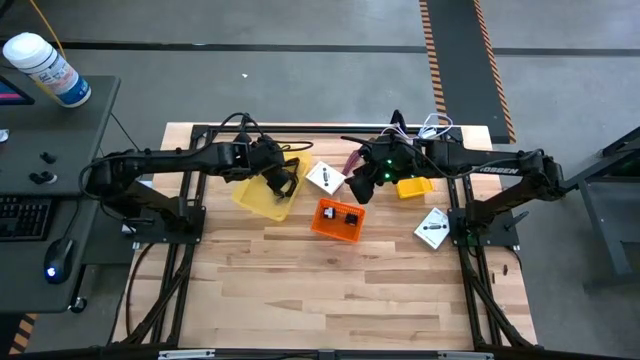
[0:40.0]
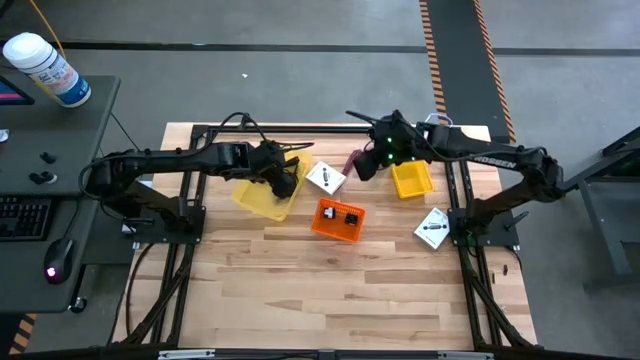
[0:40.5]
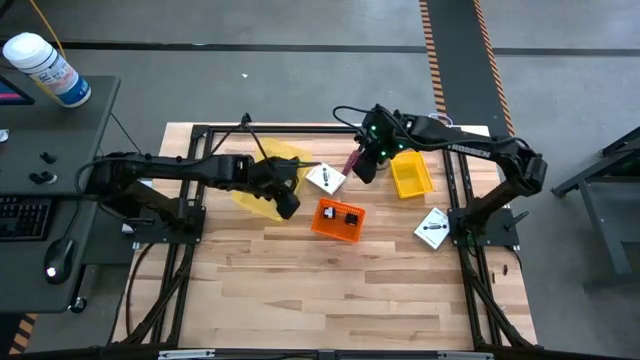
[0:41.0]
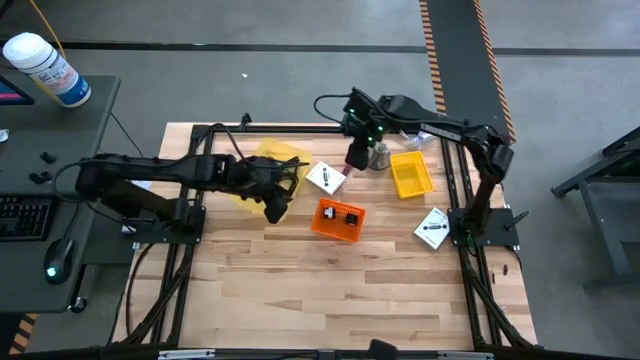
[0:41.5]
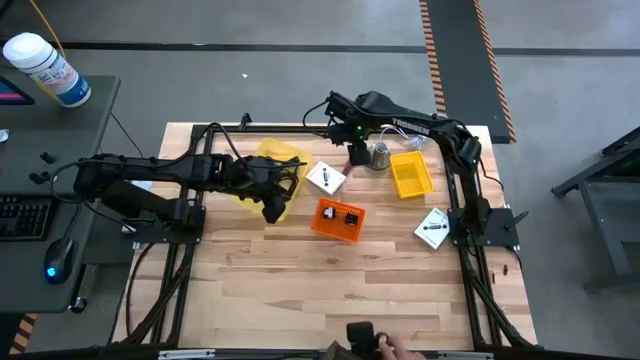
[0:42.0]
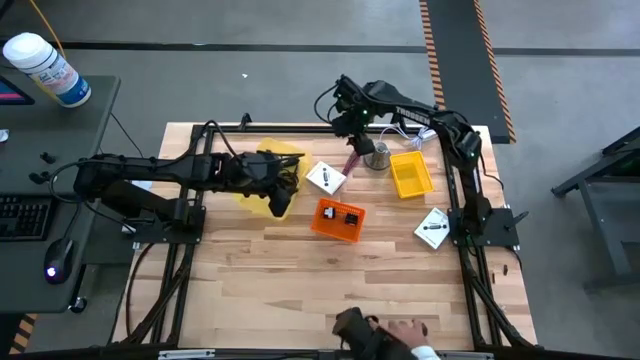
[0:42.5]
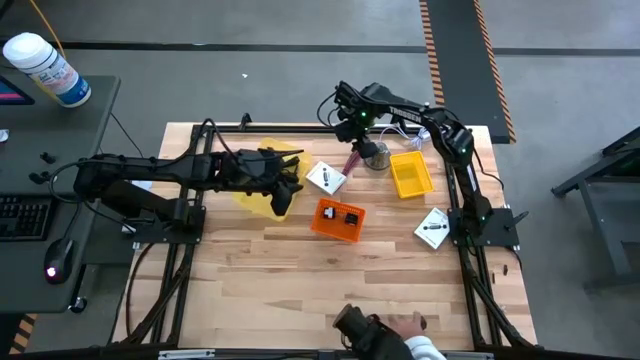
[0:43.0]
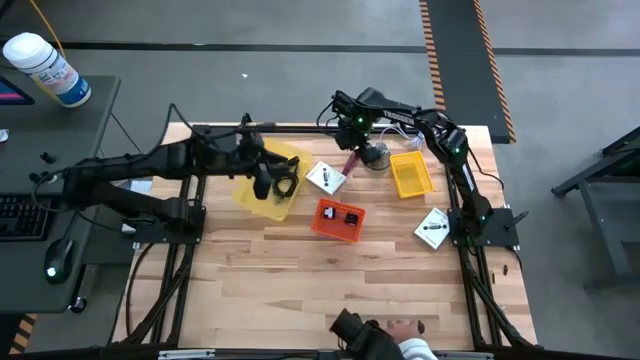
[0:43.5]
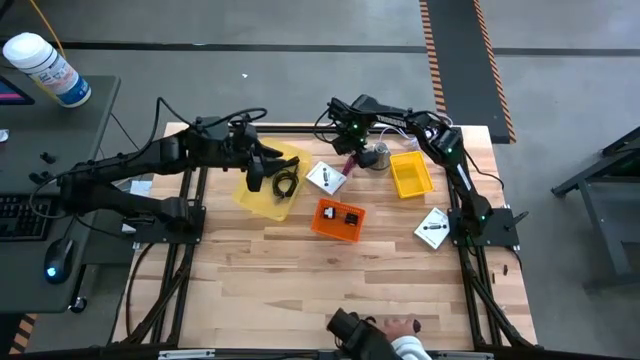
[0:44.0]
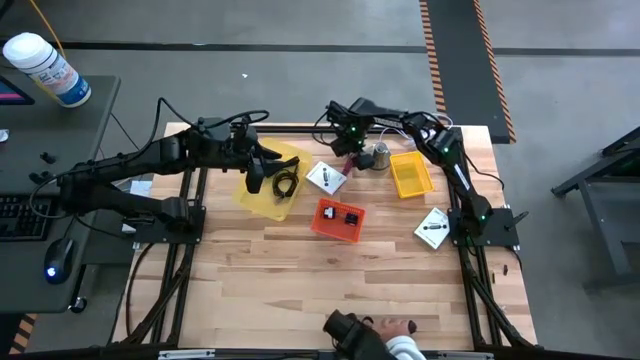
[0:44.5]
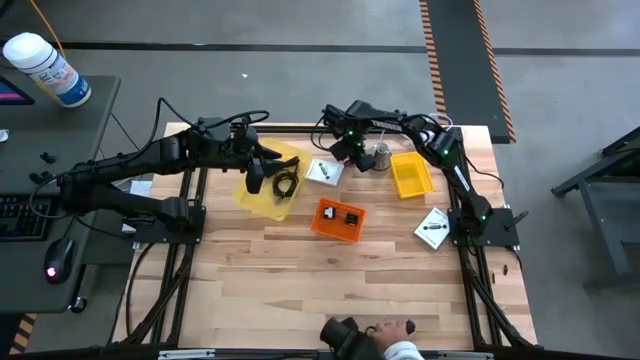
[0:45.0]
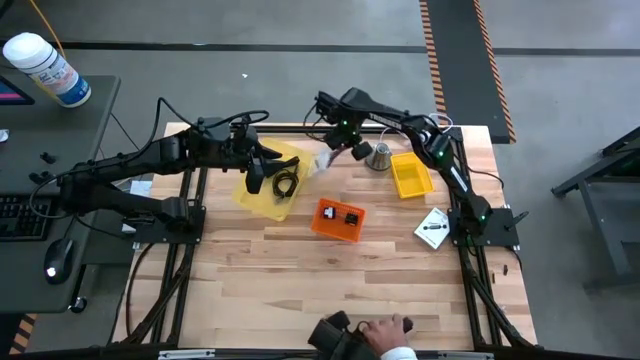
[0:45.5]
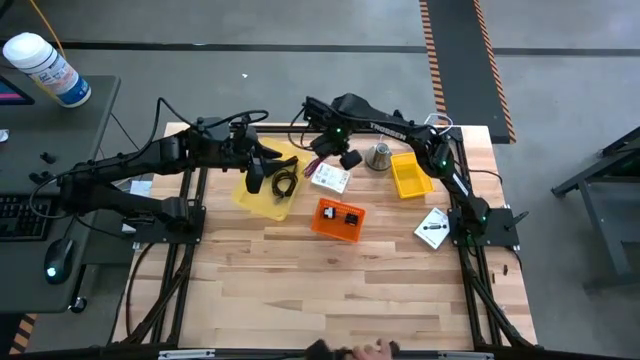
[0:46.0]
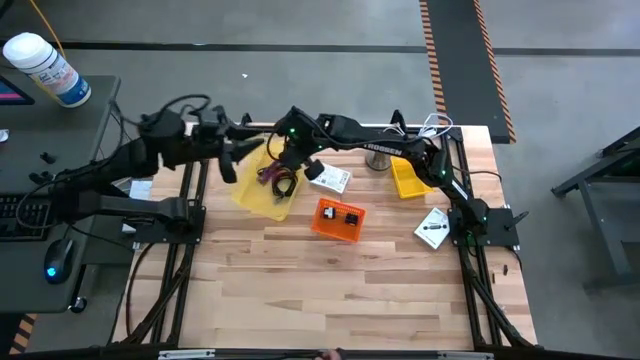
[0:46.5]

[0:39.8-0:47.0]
Task: Pick and place items into bin
Put the pink charger cable into the light yellow bin

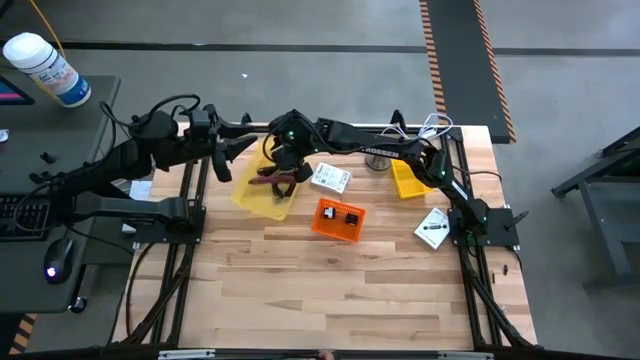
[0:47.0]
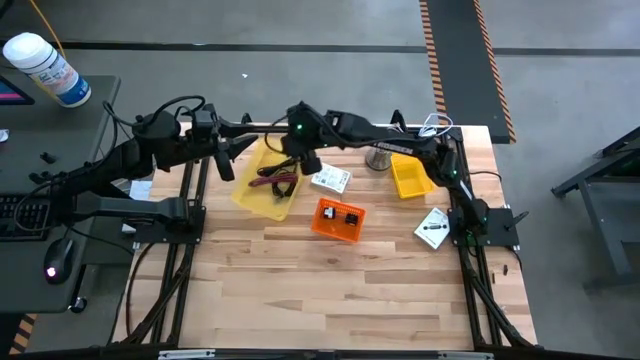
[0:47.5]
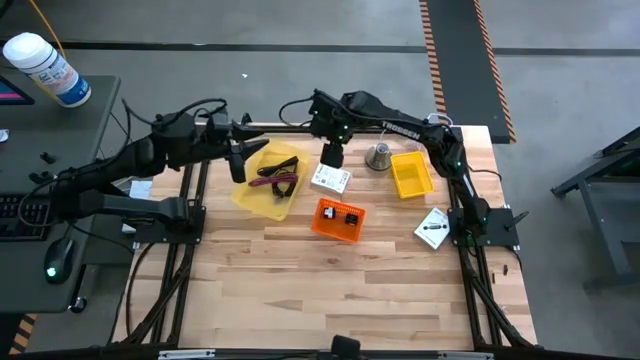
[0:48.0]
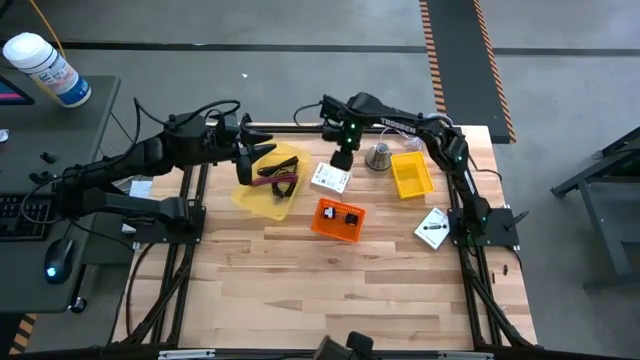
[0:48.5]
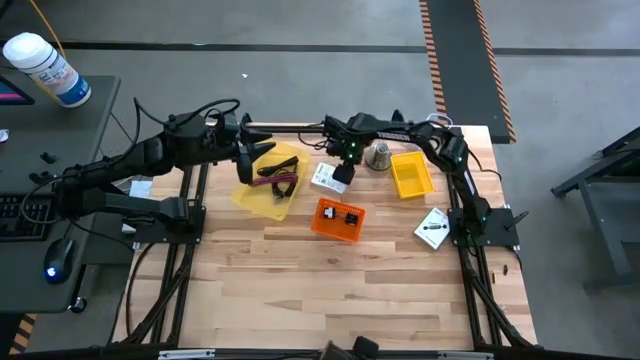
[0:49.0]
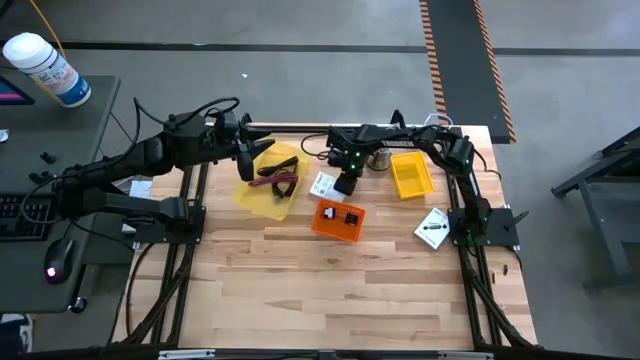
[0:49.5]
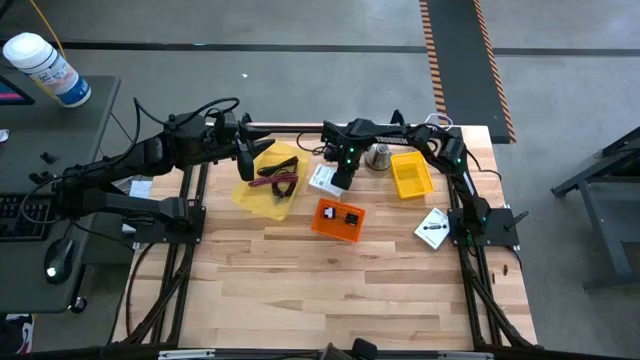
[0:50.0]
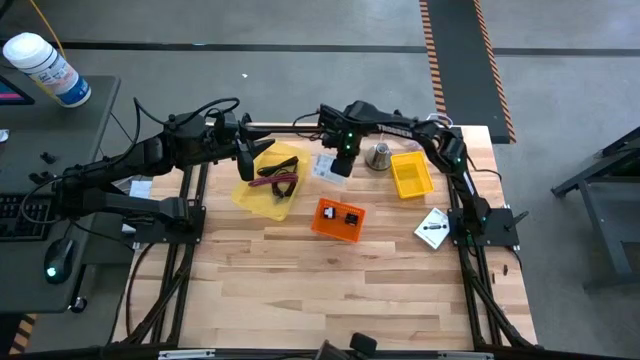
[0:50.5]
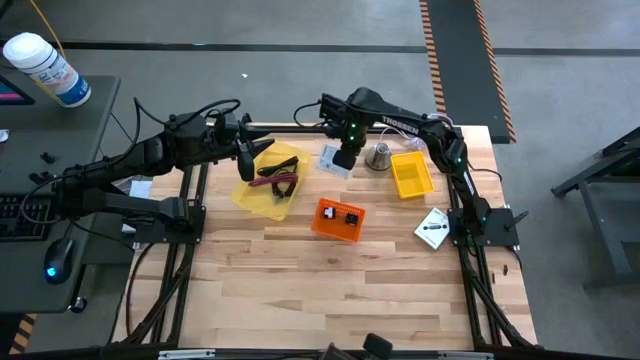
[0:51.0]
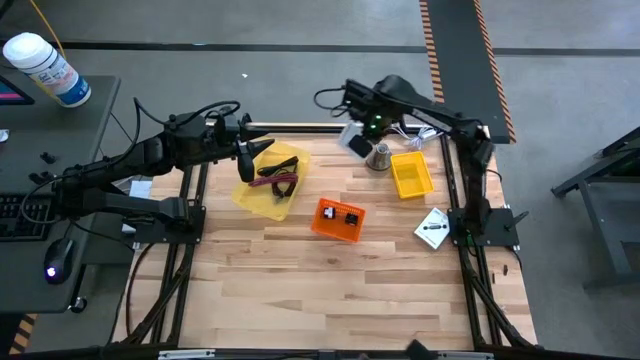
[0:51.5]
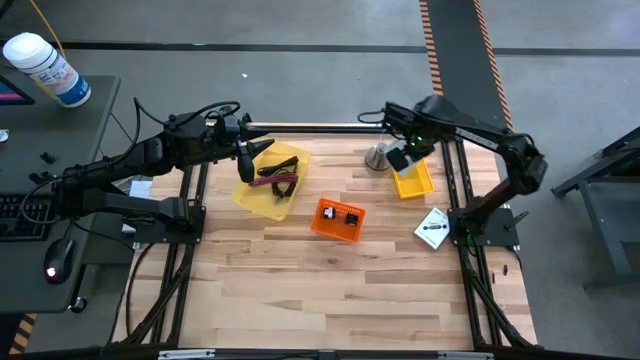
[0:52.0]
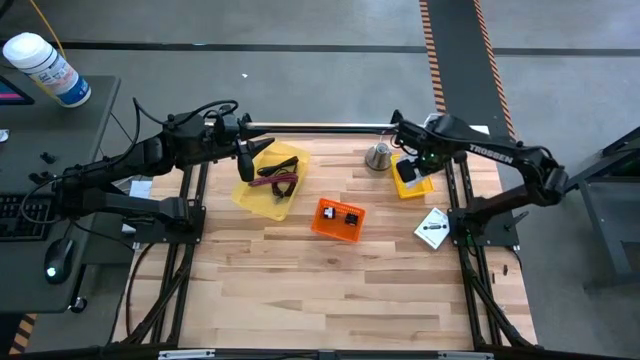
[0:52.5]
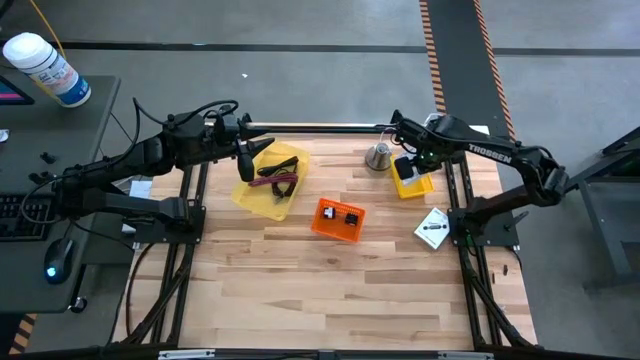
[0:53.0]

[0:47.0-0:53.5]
Put the top white card reader box into the yellow bin

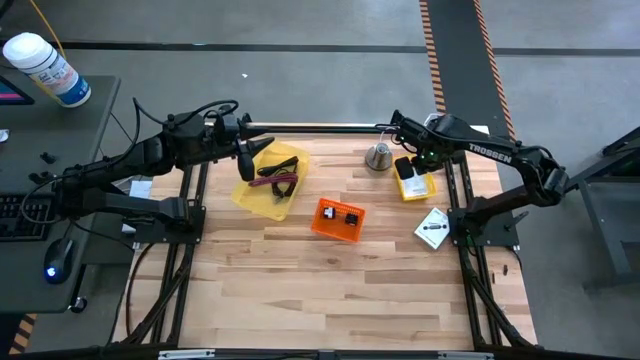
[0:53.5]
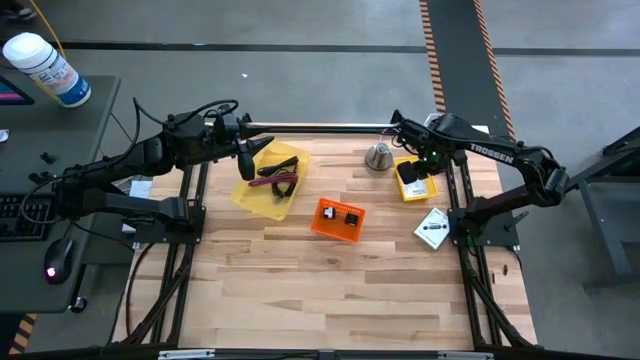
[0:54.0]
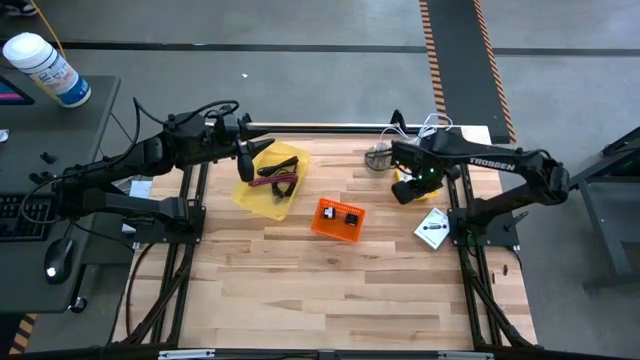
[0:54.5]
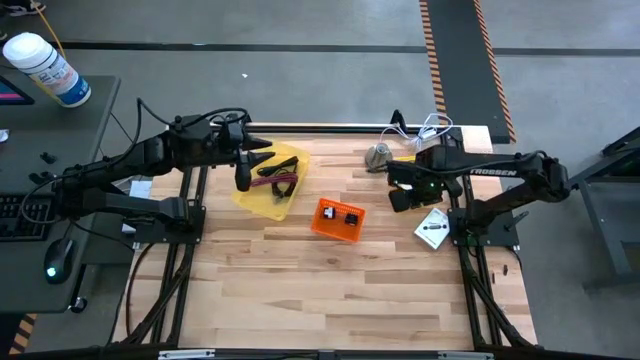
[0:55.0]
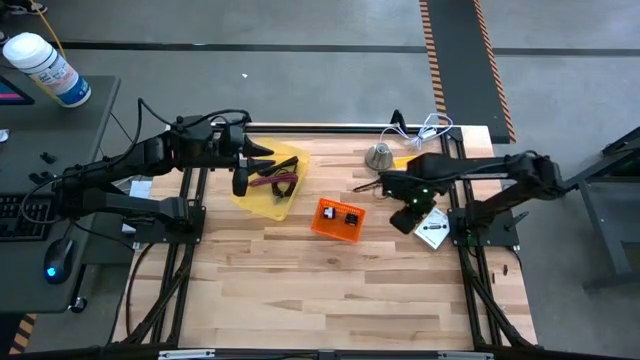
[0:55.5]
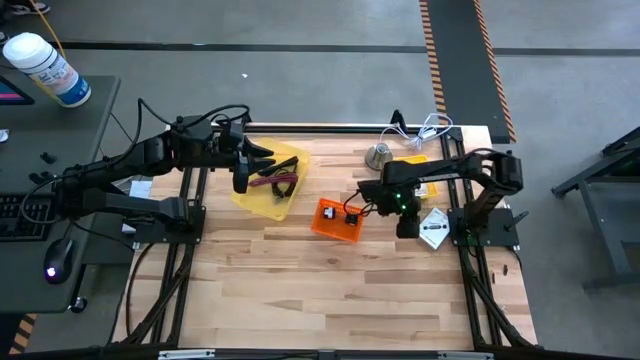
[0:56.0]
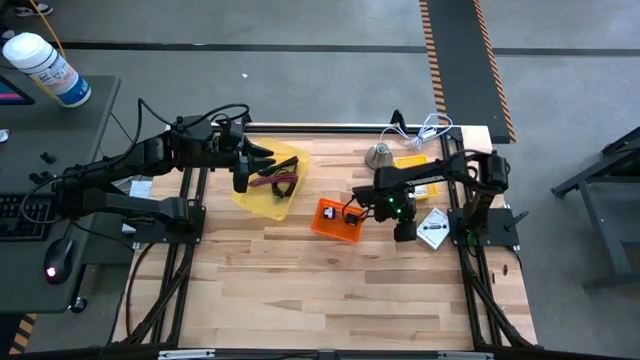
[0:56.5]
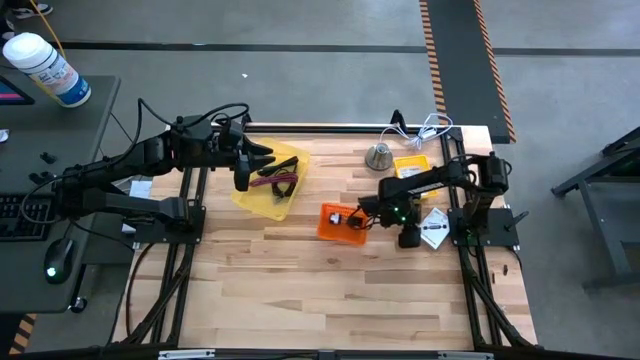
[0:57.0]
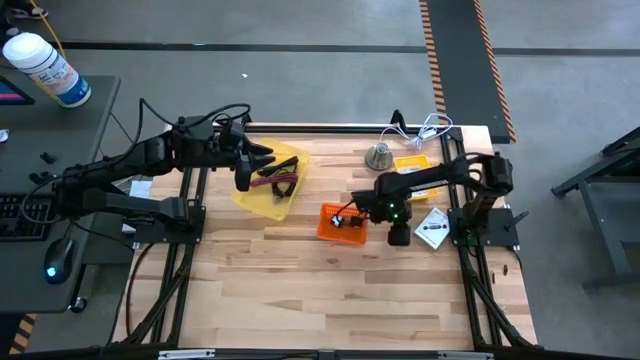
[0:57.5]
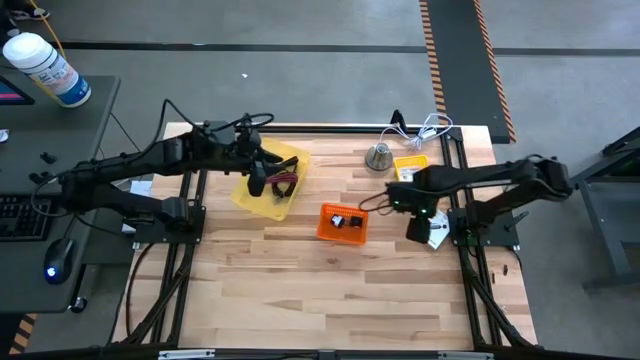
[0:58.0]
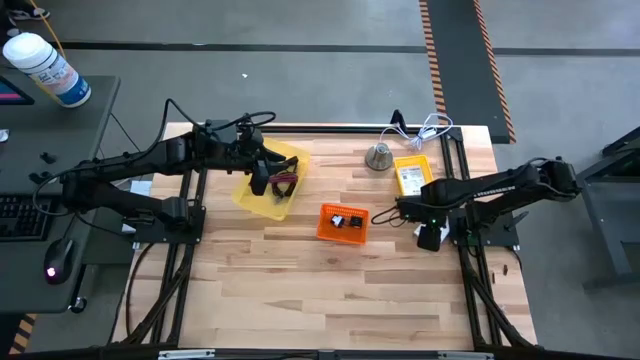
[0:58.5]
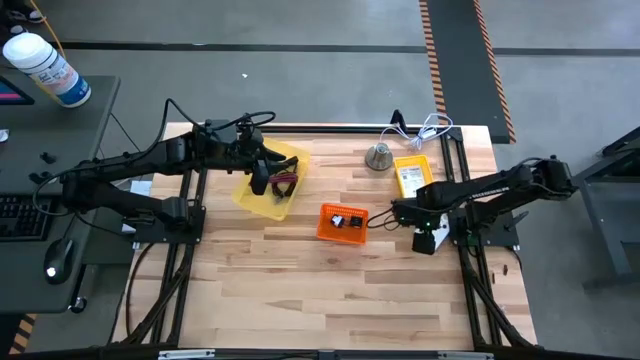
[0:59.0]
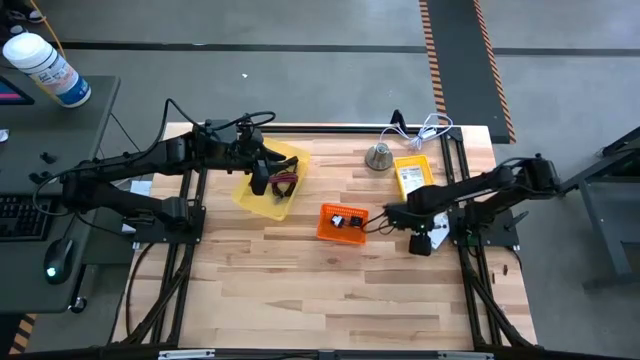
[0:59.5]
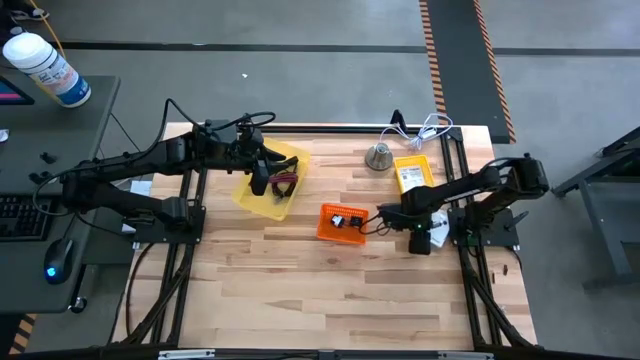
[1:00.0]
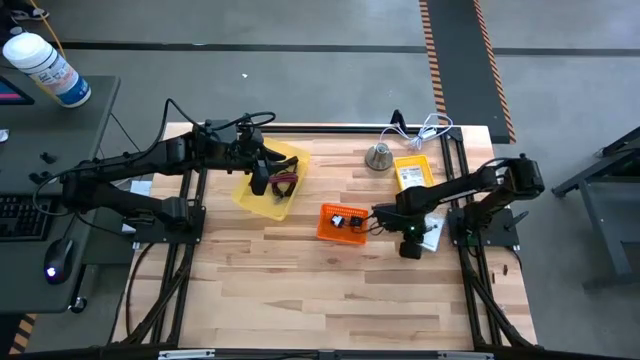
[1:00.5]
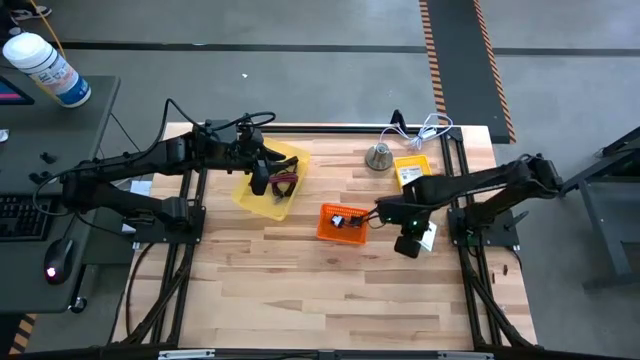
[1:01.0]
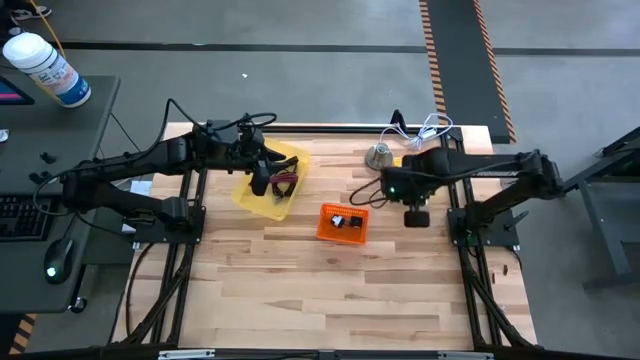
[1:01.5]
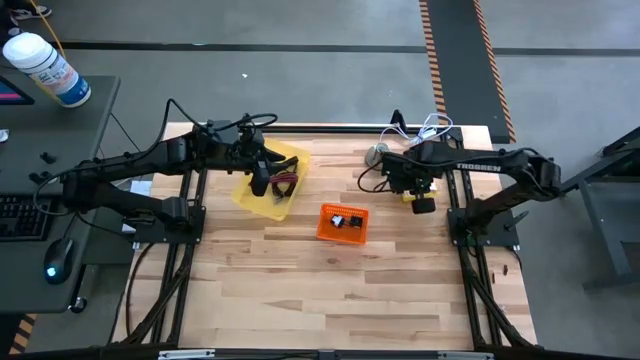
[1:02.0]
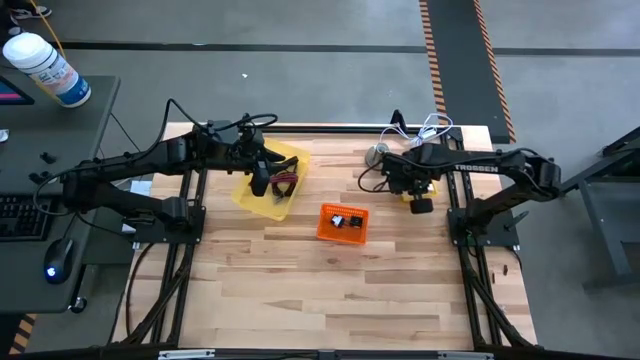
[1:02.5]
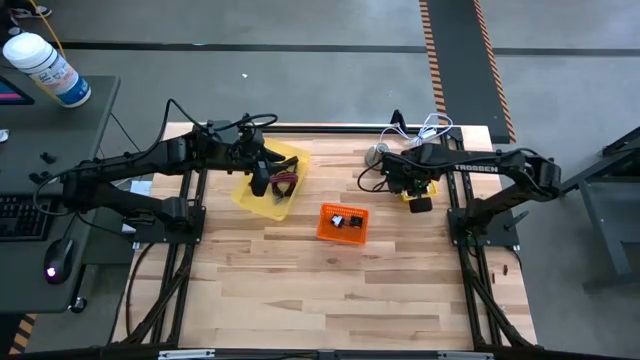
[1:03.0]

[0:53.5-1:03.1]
Put the white card reader box into the yellow bin
